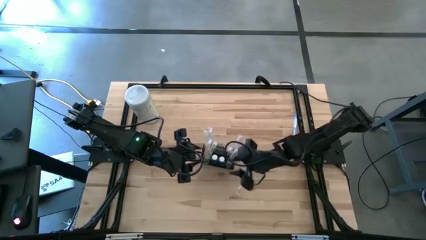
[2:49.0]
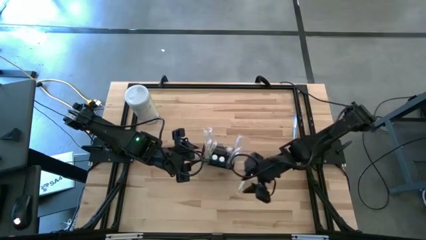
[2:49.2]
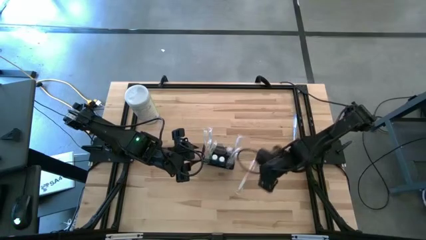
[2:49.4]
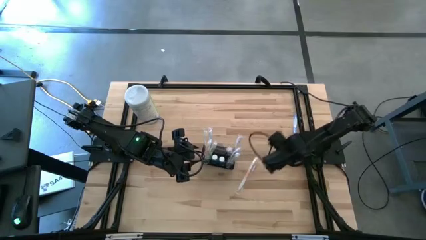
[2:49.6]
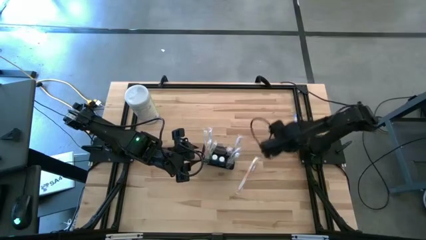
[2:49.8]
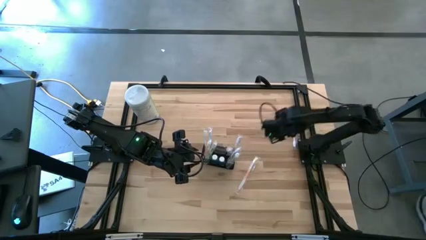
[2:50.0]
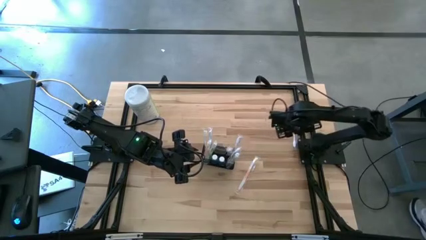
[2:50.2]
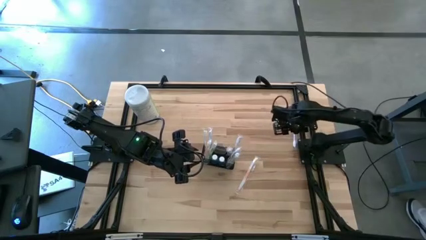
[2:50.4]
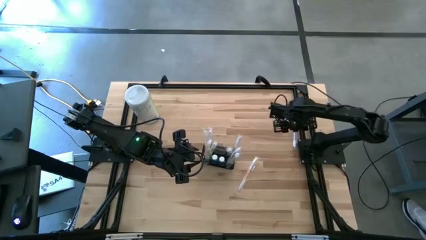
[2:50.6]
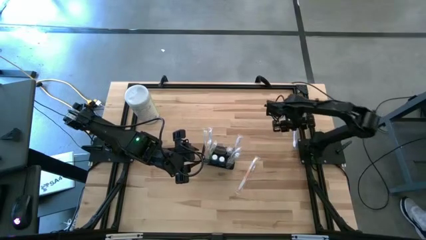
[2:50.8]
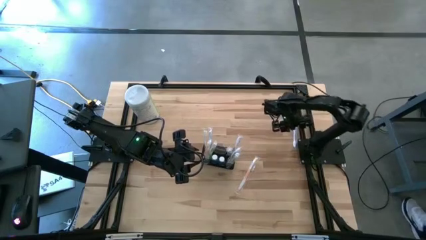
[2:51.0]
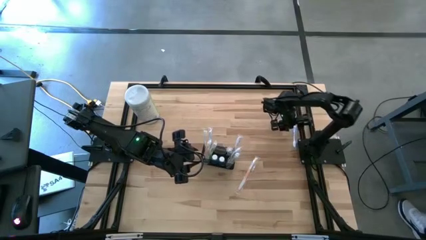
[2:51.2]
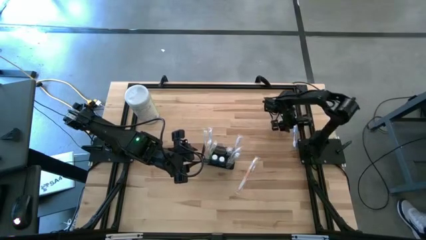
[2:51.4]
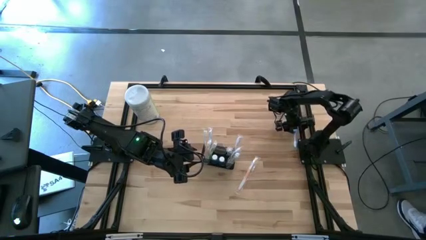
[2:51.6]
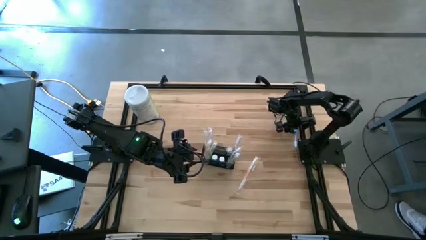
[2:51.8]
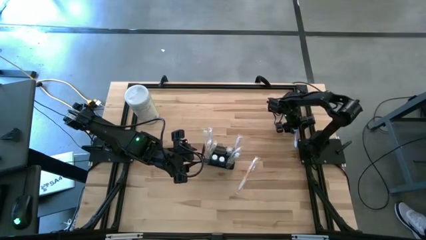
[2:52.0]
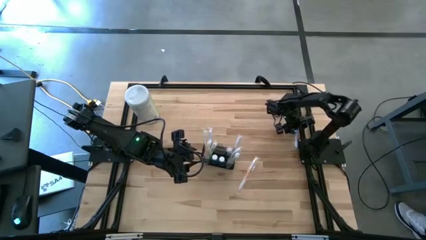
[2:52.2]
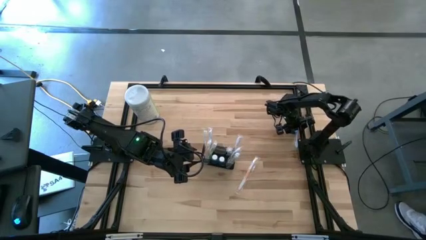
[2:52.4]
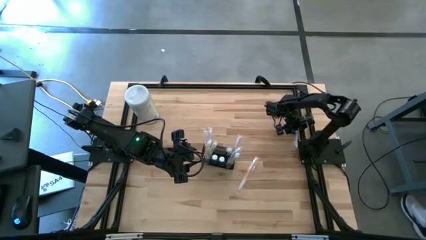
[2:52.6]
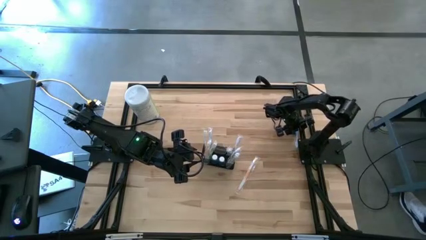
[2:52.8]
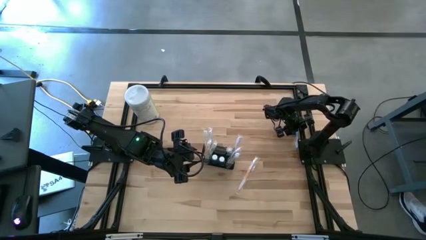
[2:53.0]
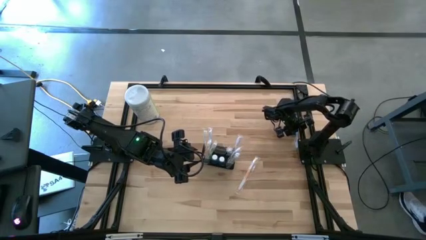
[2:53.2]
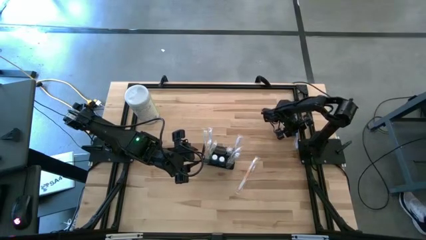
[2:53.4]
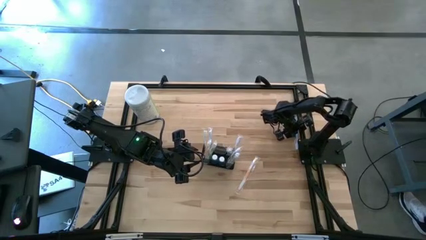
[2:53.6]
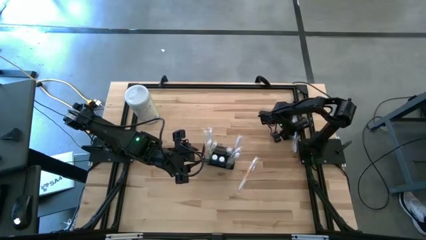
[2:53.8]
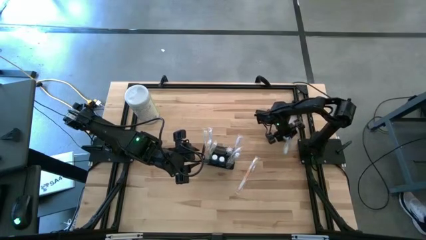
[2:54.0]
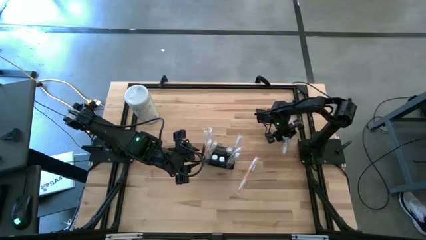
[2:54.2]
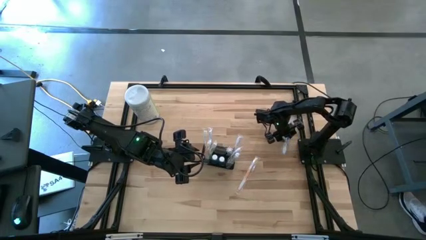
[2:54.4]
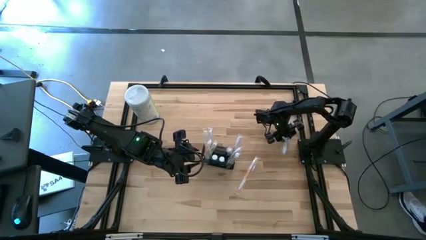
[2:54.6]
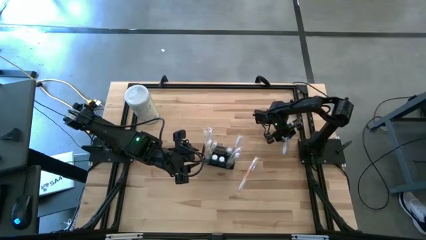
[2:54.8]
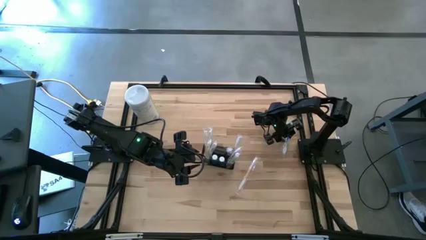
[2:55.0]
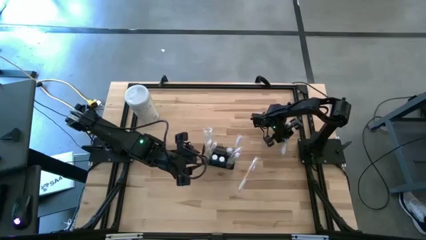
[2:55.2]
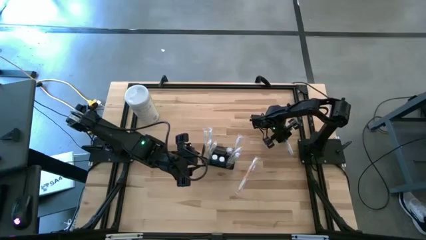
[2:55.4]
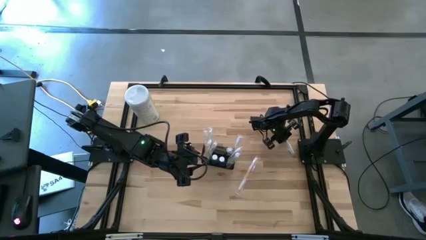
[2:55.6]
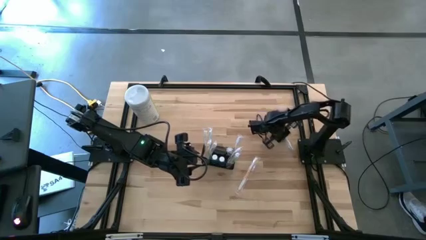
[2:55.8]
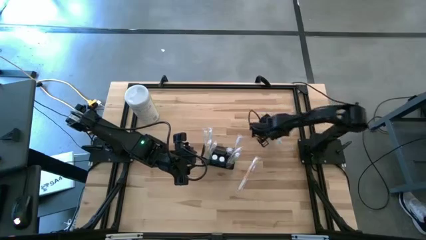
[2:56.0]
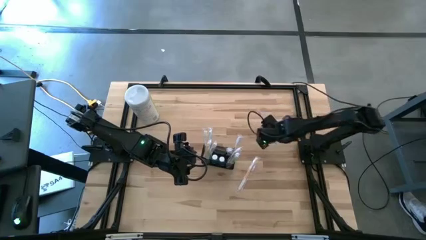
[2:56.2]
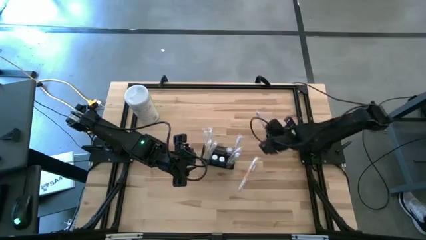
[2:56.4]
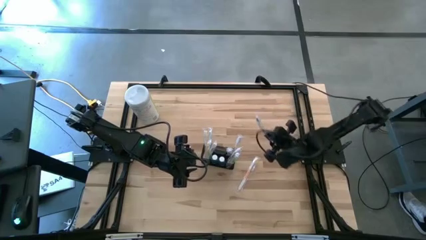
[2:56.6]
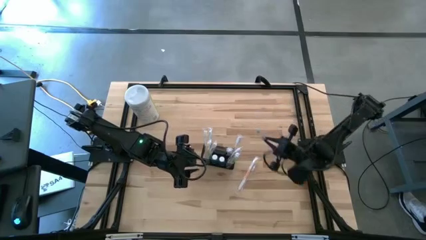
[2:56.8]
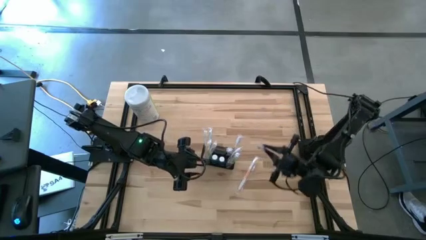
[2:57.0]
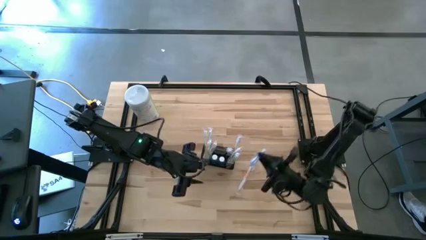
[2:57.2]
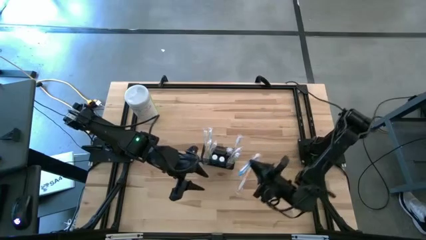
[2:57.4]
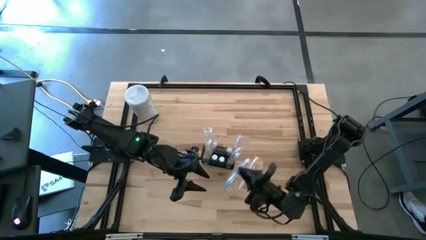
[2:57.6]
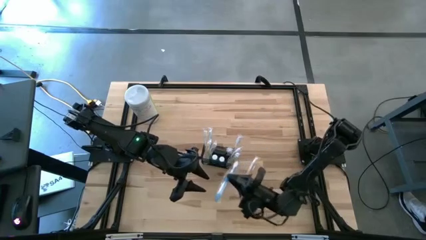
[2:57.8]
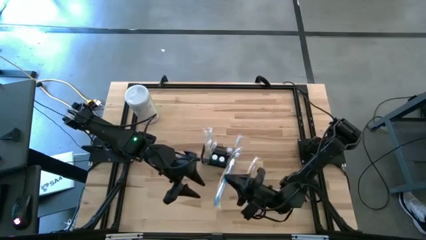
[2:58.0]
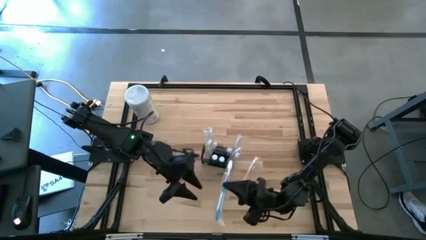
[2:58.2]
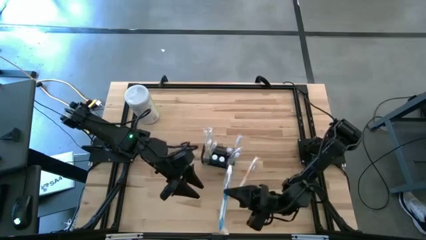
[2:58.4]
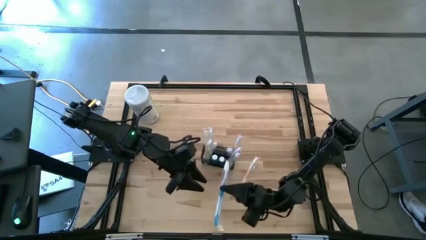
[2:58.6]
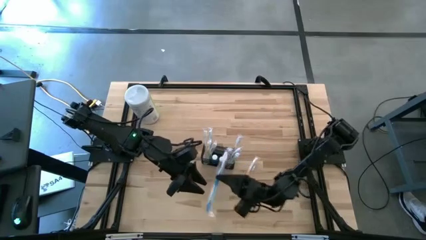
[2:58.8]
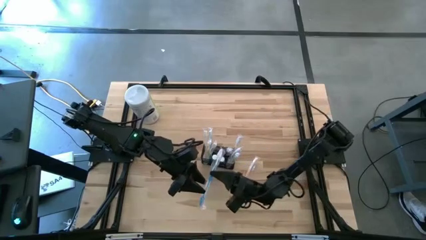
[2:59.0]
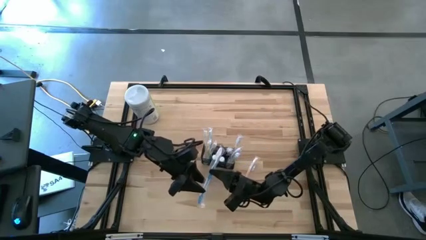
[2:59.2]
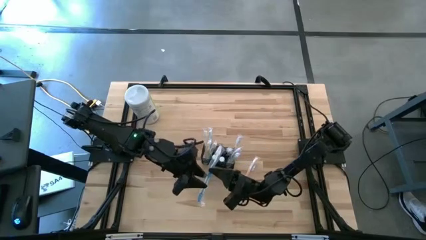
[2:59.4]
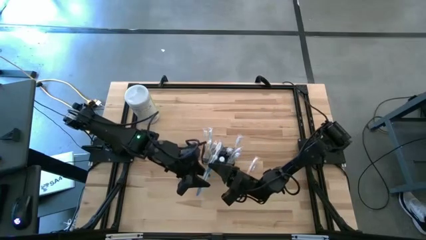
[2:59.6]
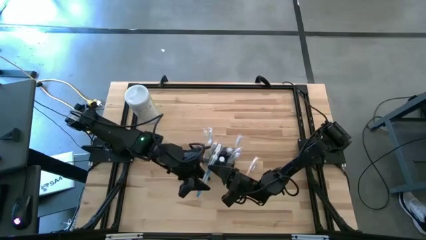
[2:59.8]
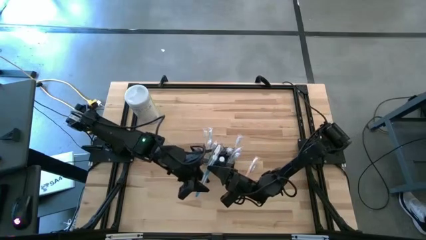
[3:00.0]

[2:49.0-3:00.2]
Task: Pick & Place toothbrushing station
Put the blue toothbrush into the mesh organizer
